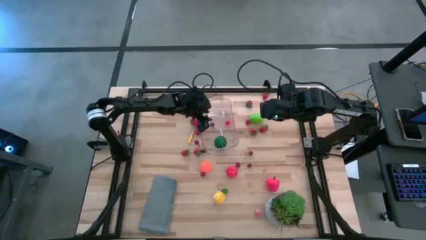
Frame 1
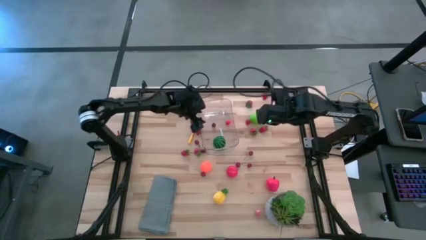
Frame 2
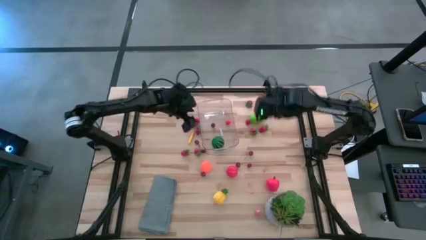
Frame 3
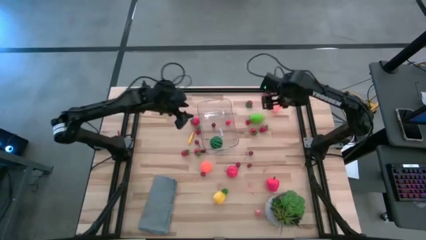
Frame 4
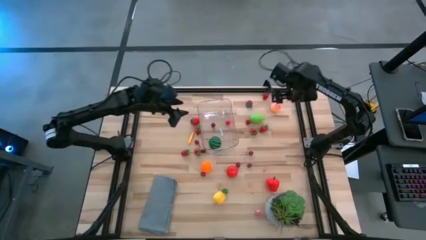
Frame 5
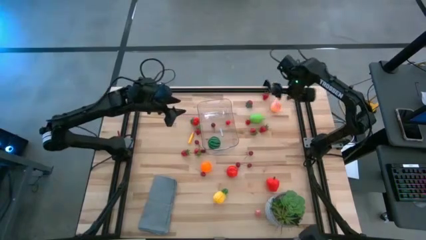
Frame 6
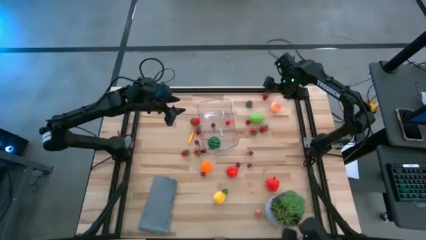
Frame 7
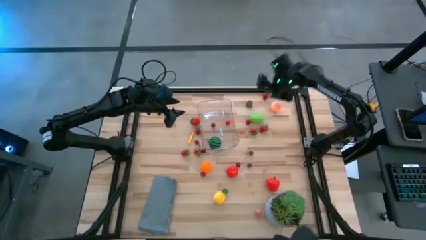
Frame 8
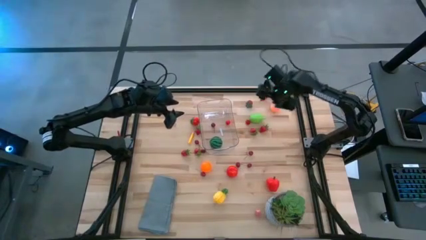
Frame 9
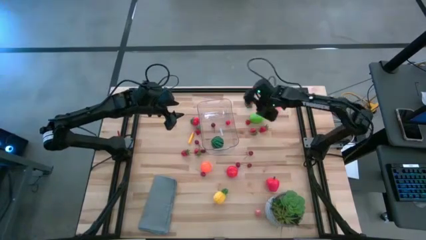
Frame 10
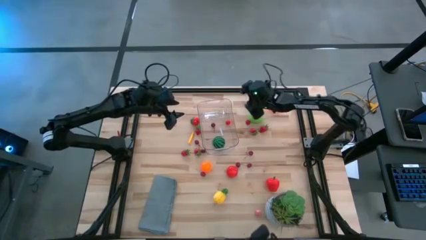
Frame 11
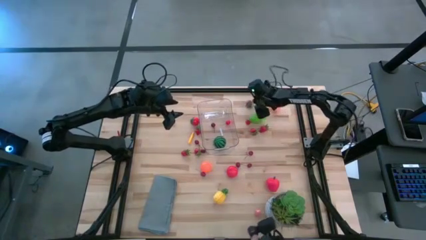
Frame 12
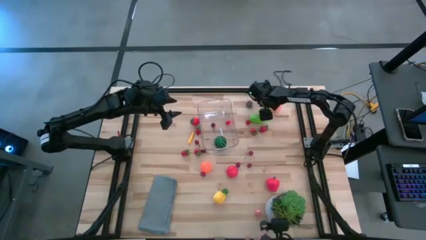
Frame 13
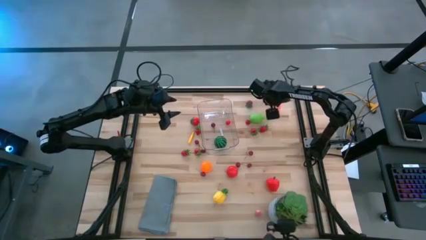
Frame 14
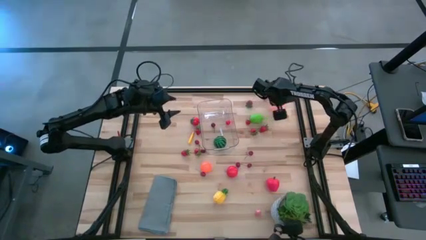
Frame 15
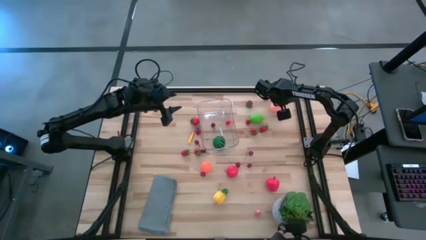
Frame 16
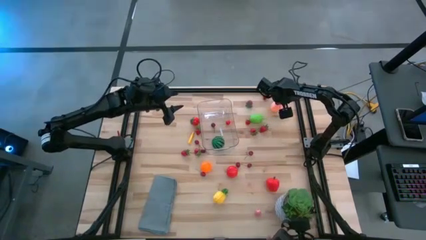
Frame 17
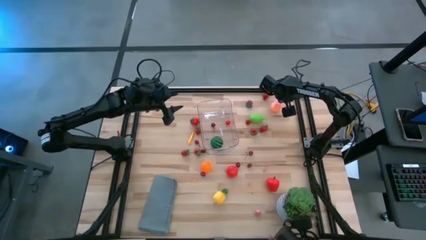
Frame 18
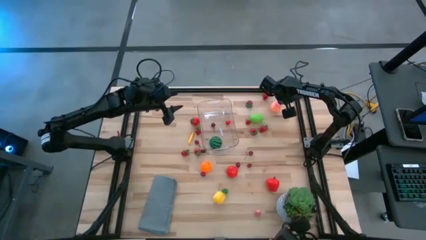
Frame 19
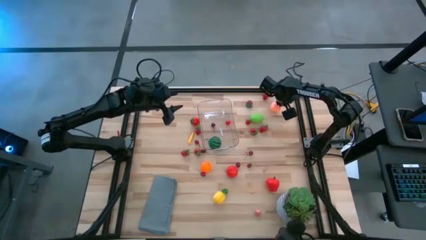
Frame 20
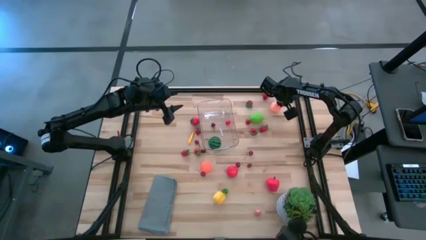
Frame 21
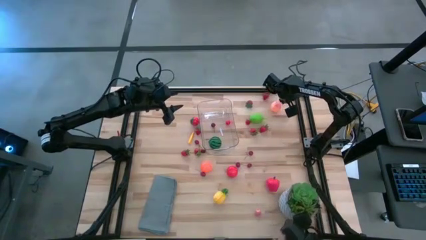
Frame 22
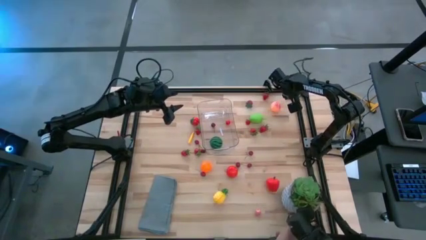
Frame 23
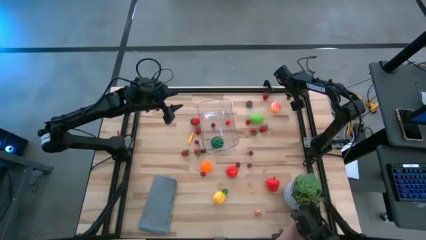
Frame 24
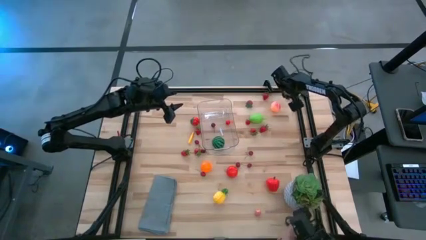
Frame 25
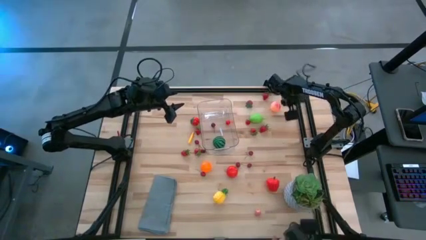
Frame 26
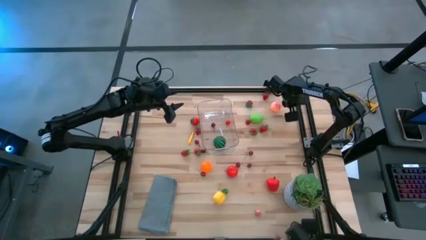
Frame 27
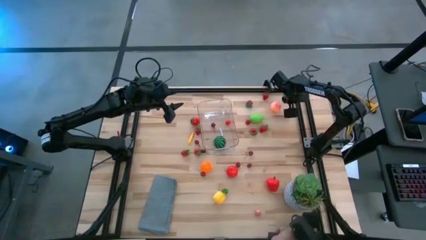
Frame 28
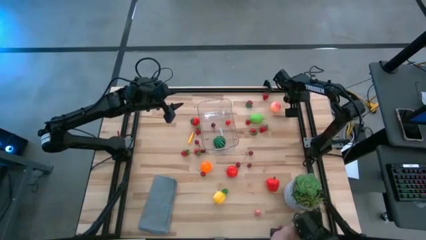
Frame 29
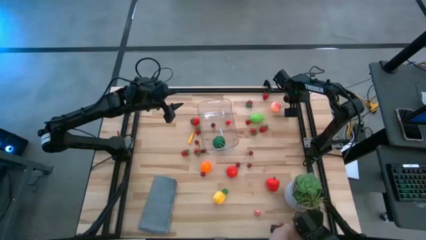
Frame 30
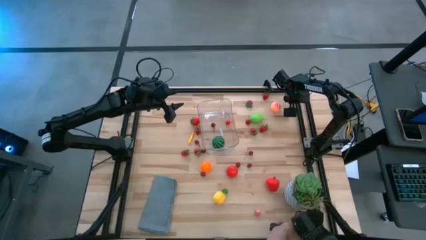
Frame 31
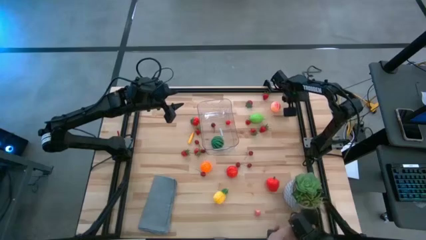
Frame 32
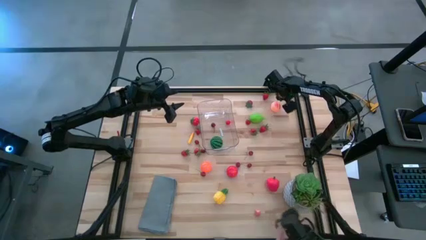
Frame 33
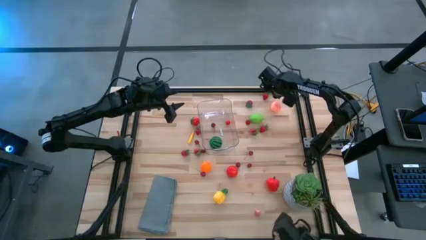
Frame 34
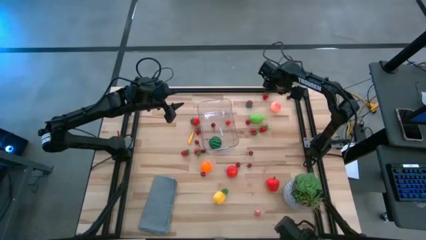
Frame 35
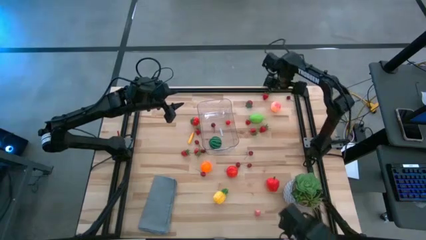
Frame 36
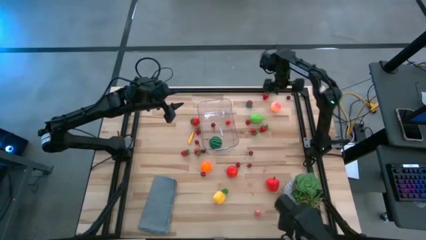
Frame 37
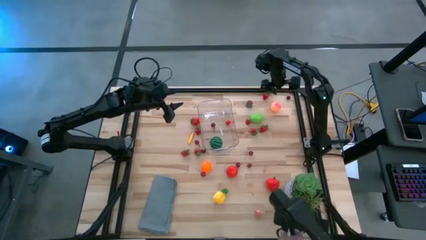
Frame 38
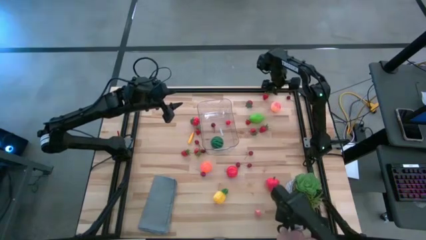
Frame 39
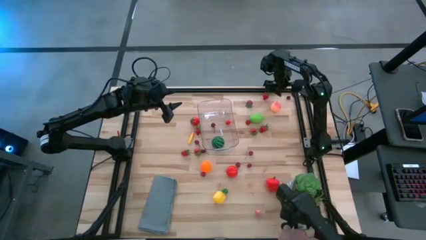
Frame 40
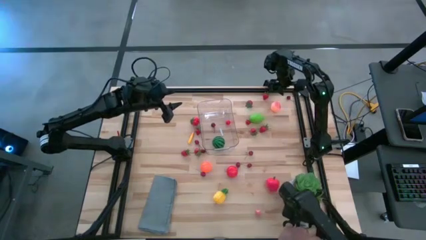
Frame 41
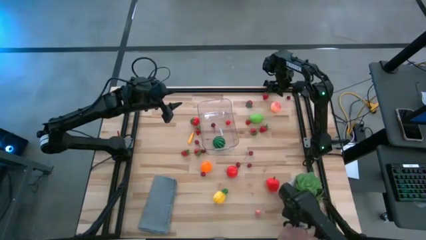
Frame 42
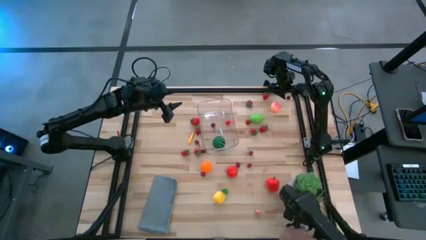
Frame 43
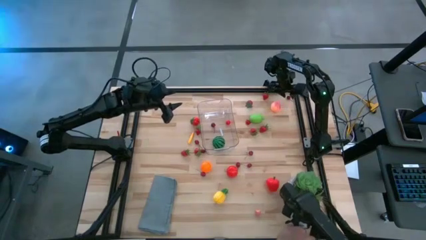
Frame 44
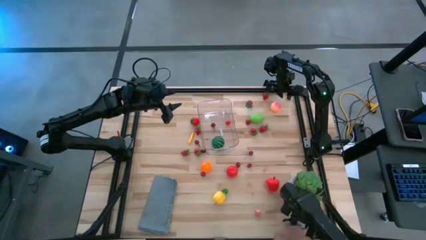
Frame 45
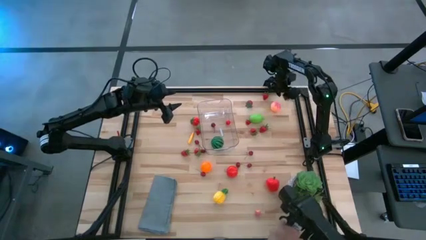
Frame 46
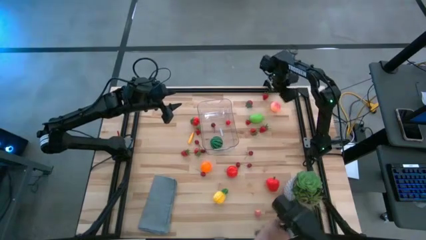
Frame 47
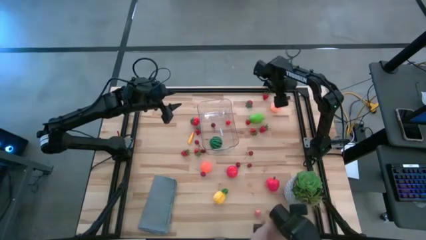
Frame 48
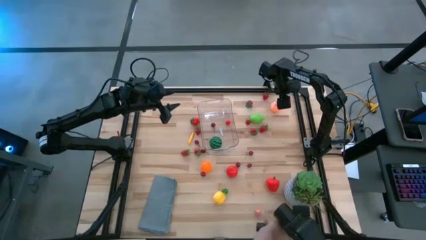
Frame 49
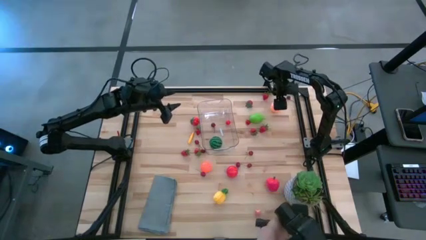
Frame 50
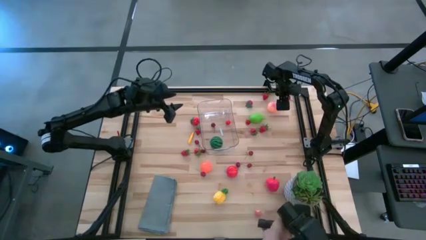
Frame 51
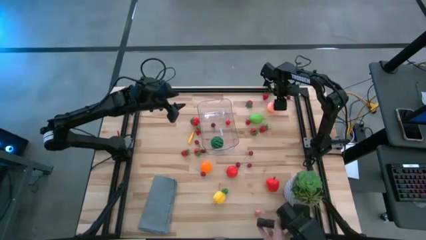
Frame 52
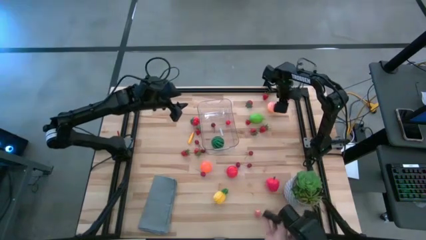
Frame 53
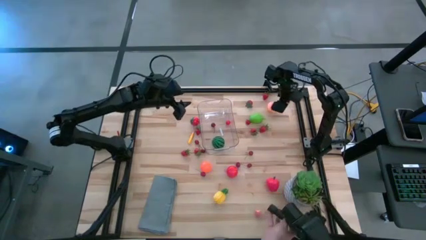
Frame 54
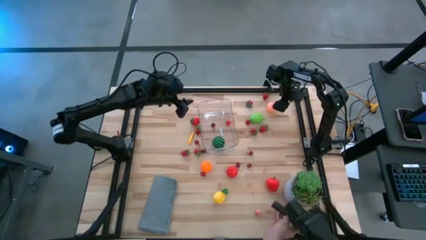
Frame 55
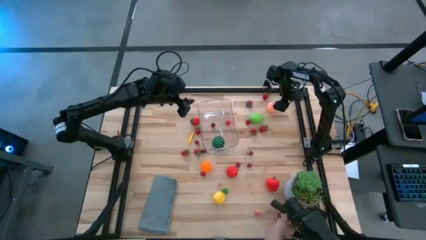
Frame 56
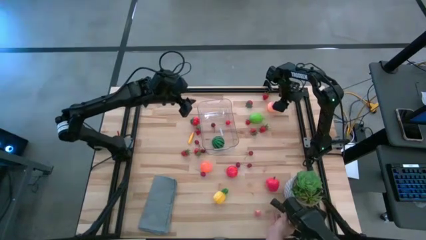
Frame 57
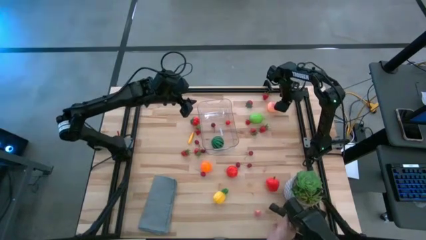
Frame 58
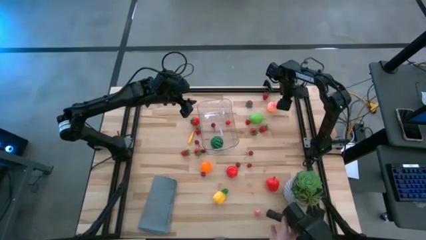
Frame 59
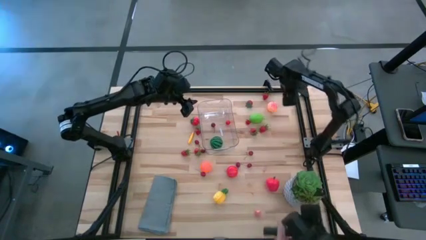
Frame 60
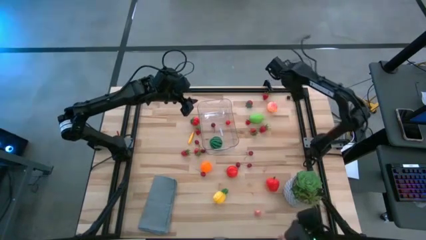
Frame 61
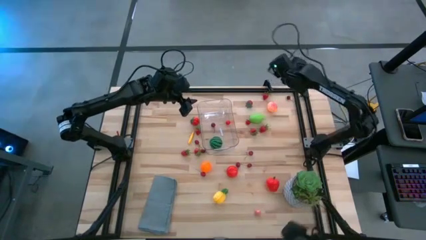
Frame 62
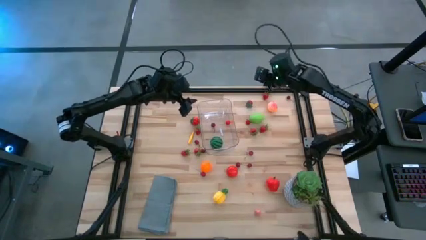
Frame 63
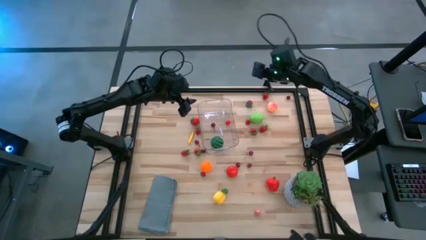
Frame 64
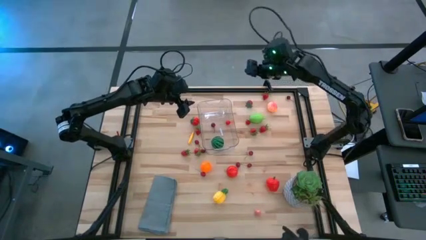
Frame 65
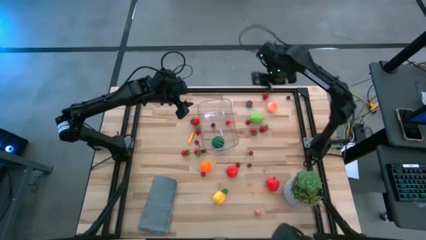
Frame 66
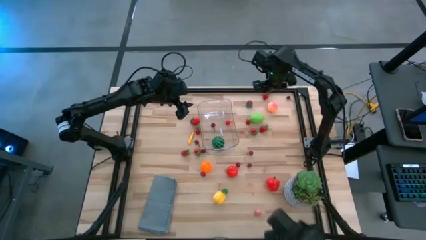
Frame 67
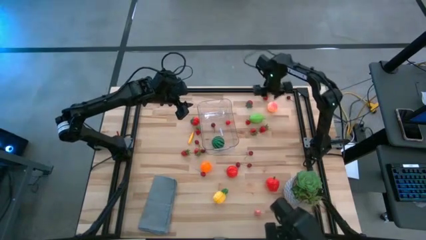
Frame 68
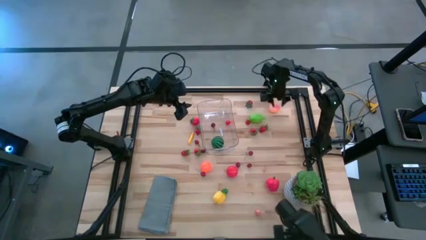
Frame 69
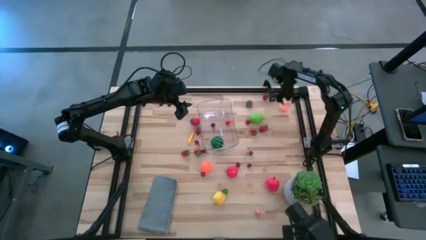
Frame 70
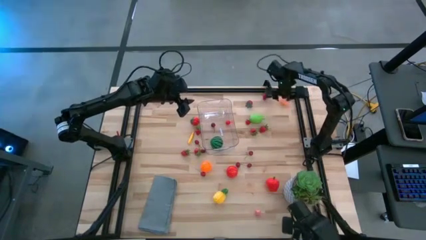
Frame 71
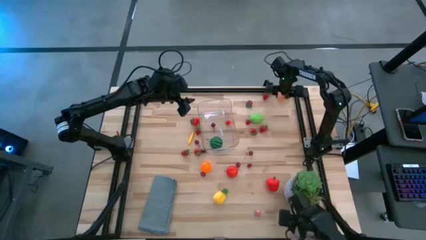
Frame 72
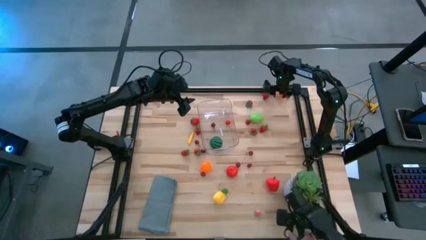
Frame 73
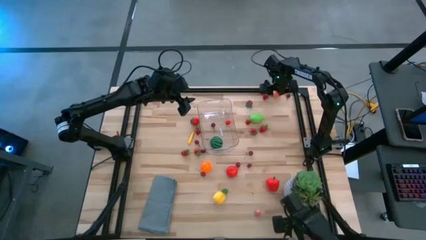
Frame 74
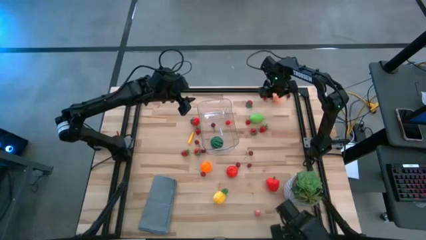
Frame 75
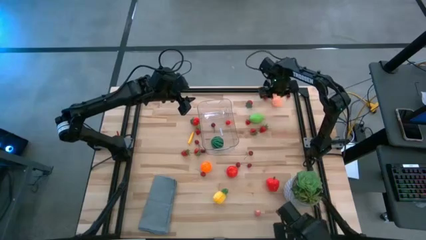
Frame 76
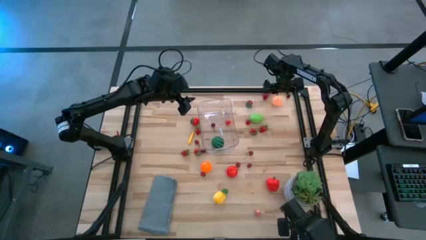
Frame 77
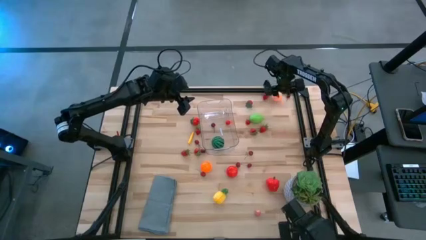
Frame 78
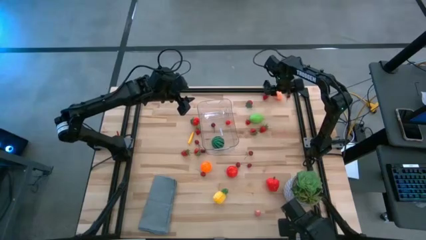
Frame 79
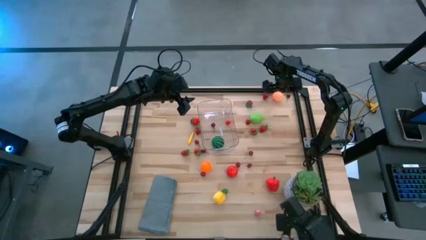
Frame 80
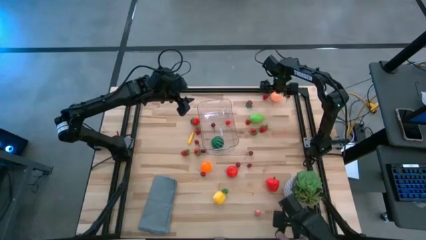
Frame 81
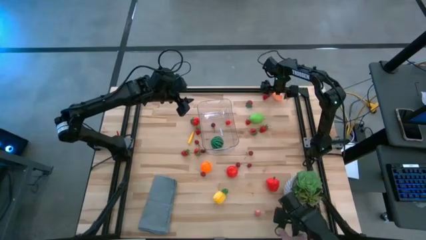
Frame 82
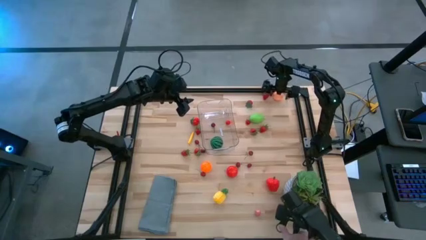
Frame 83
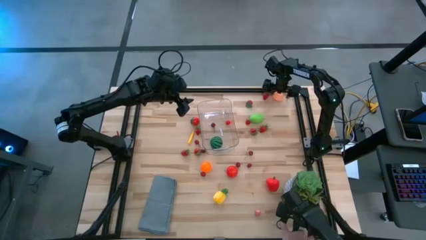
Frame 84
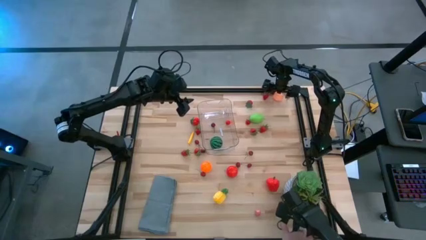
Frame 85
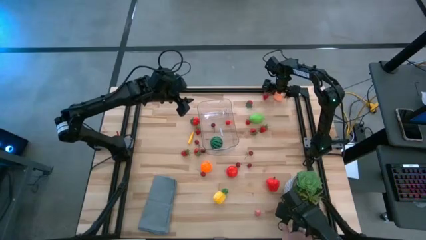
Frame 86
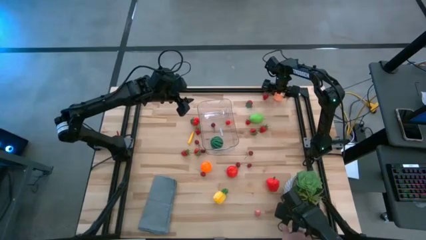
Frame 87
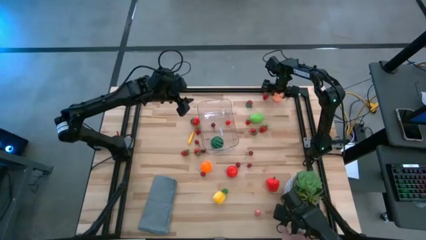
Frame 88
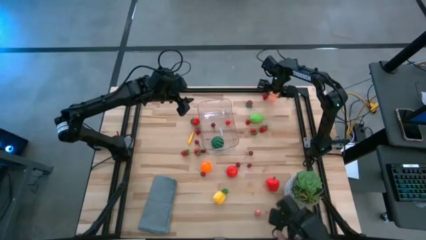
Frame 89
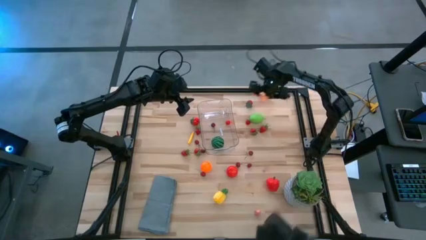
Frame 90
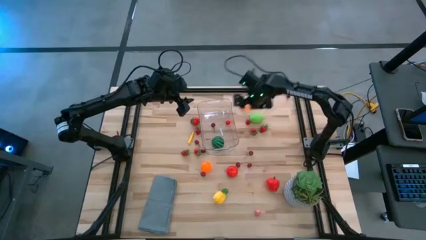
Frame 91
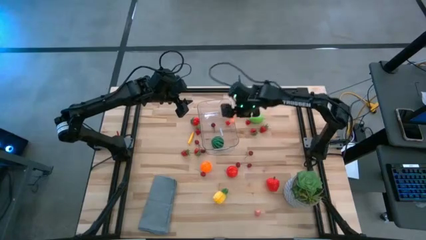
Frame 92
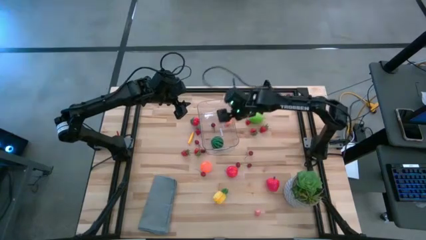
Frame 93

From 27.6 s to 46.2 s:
Task: Pick and placing Produce into tupperware
Put the pink peach into the transparent container
